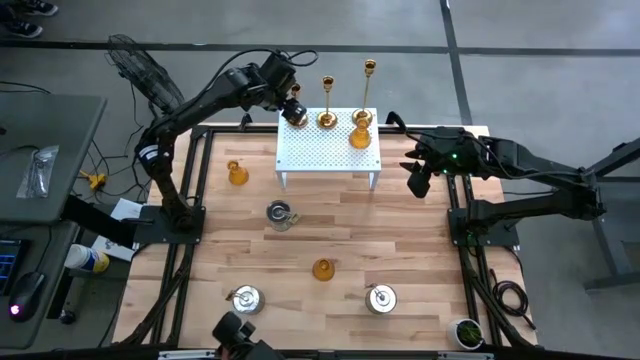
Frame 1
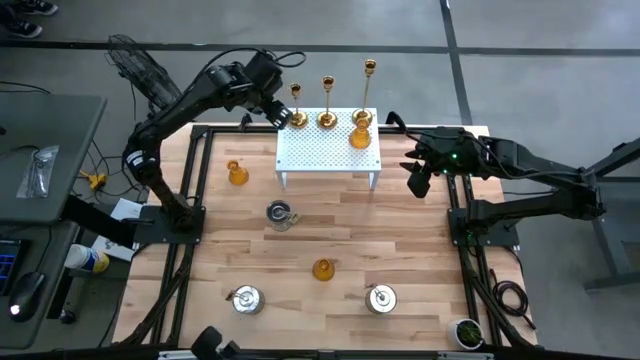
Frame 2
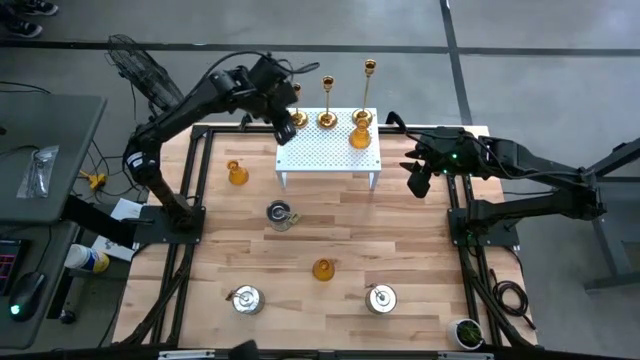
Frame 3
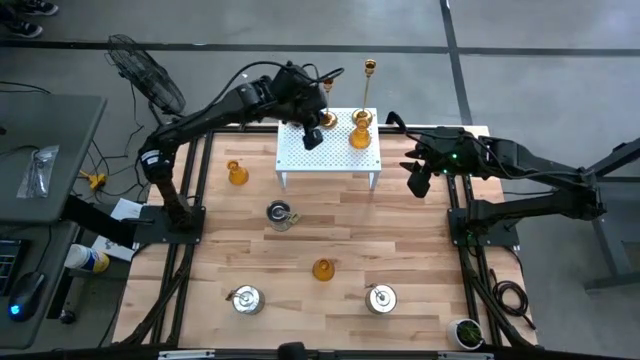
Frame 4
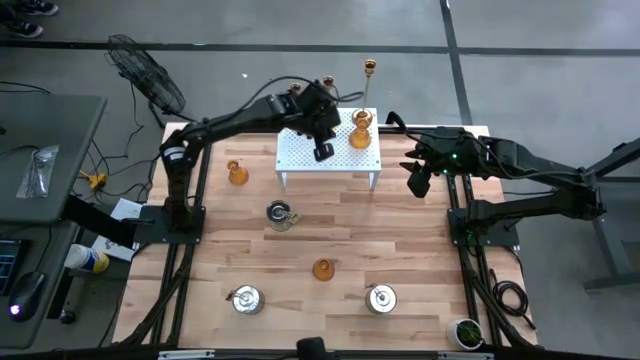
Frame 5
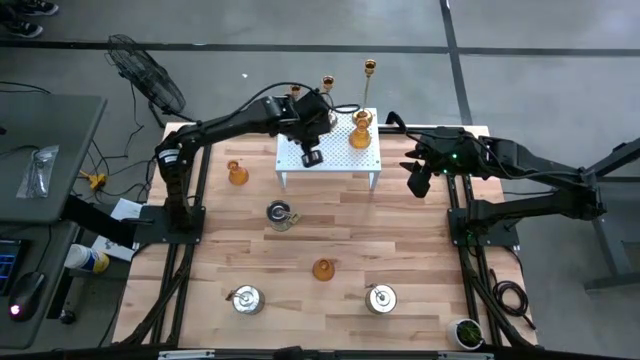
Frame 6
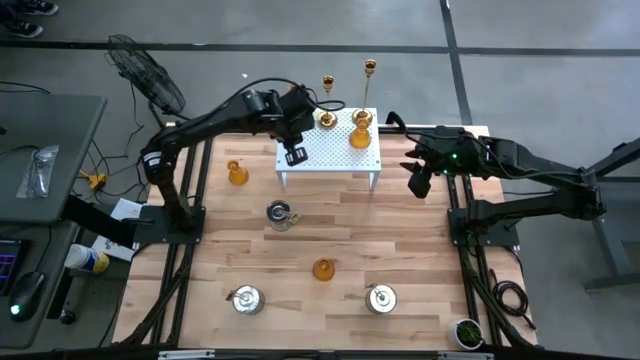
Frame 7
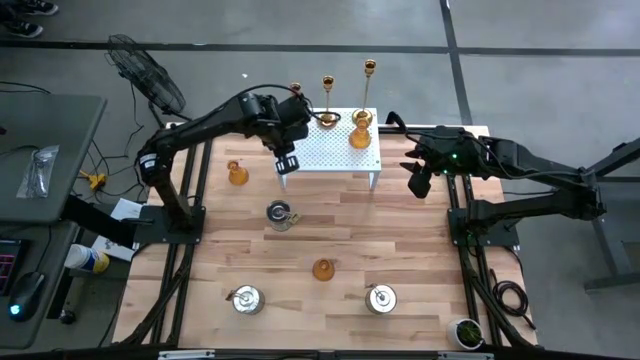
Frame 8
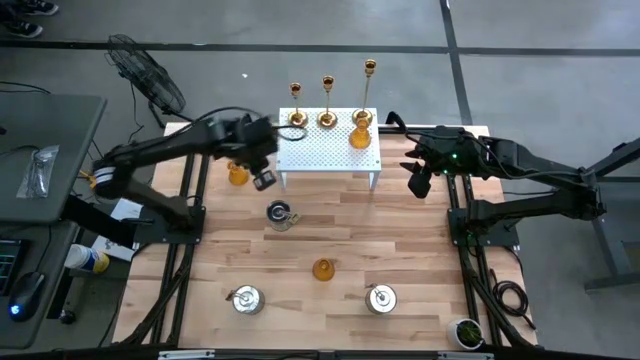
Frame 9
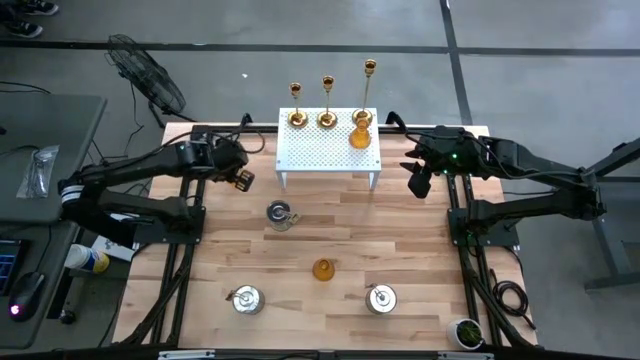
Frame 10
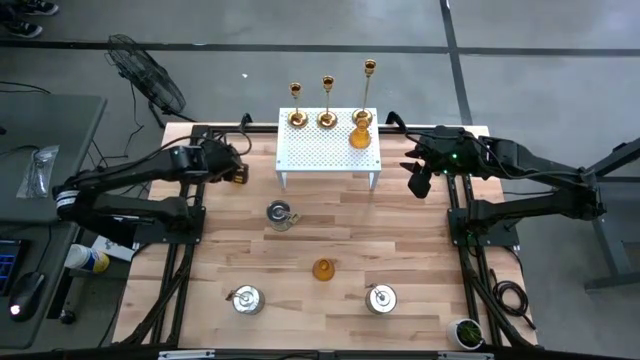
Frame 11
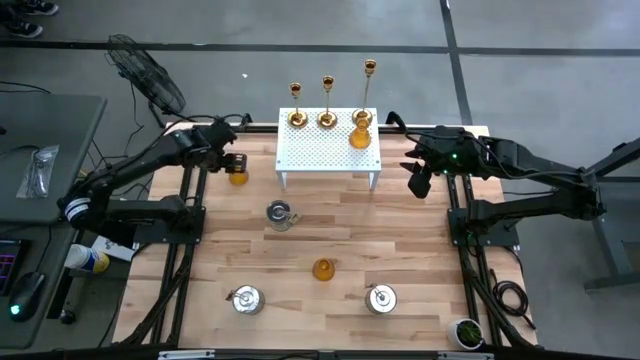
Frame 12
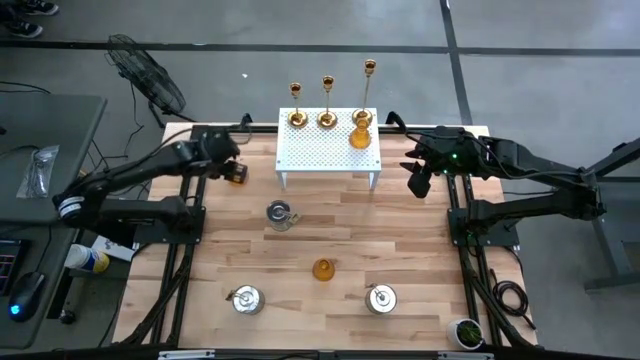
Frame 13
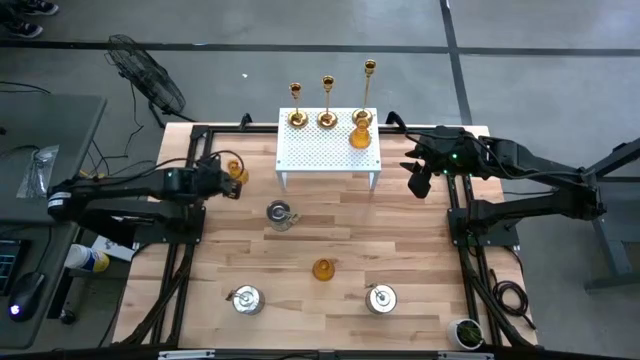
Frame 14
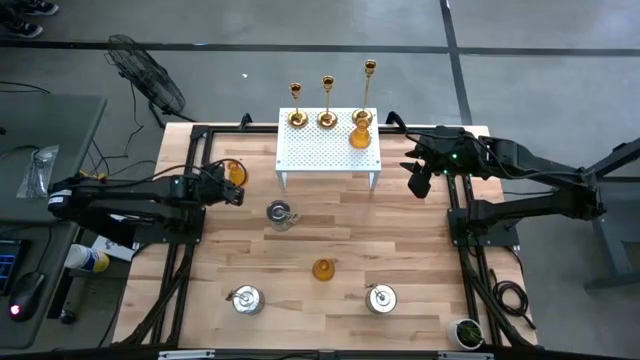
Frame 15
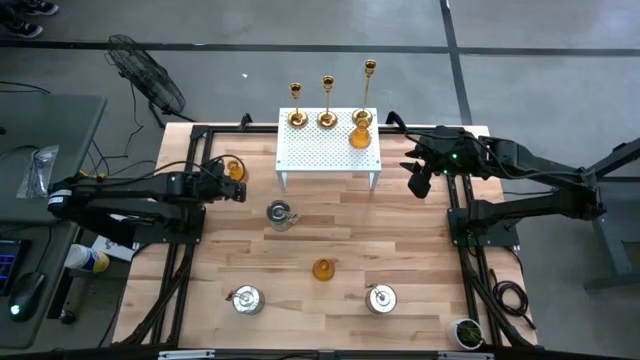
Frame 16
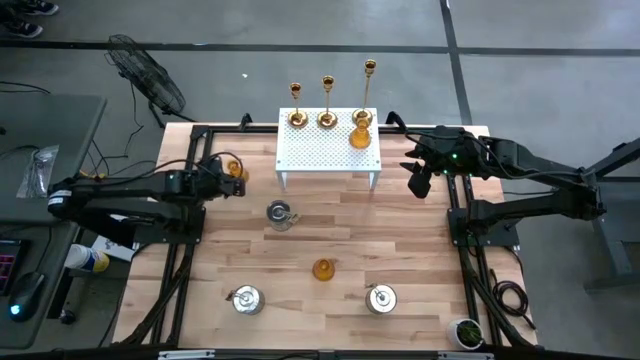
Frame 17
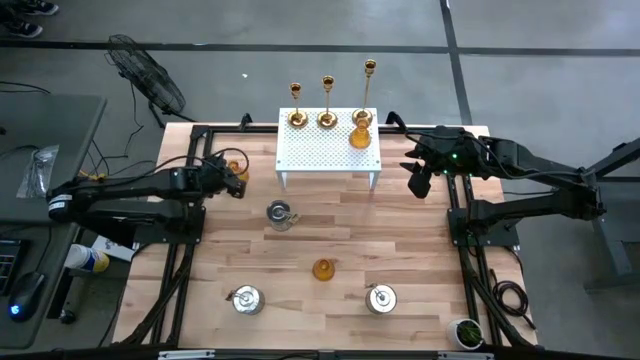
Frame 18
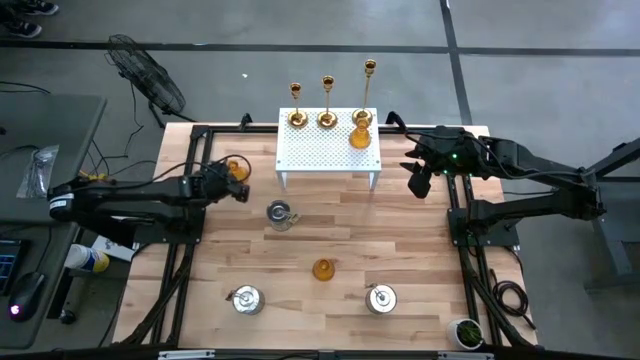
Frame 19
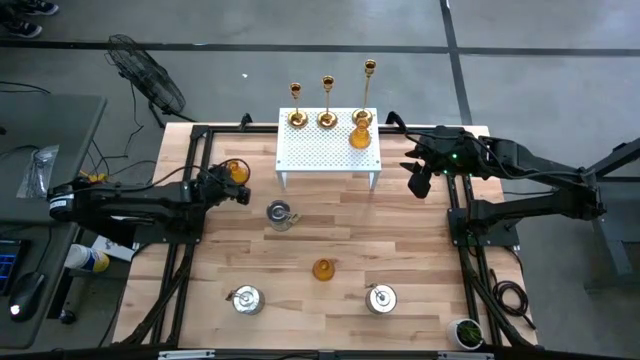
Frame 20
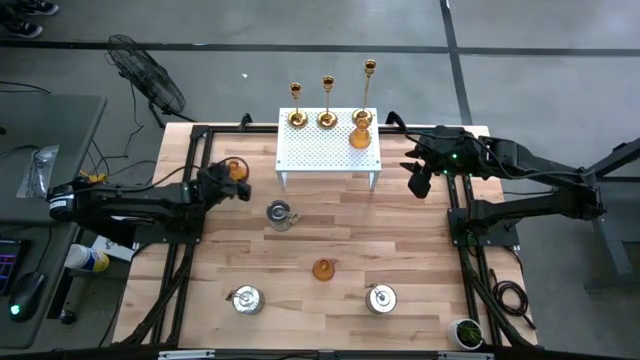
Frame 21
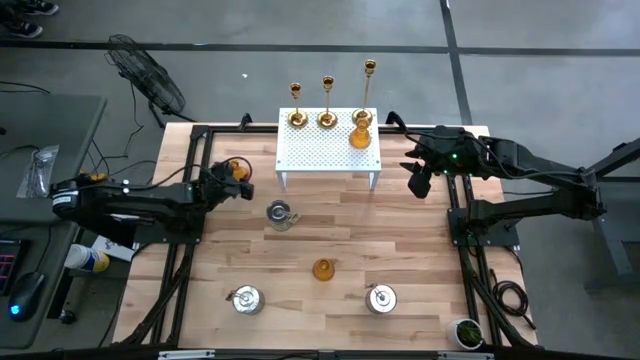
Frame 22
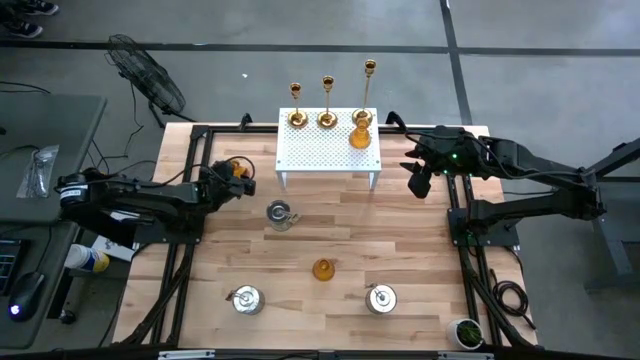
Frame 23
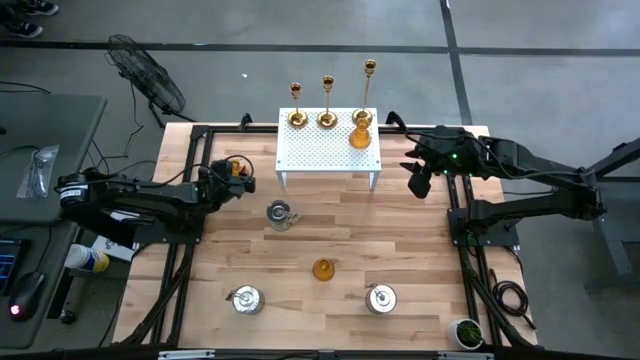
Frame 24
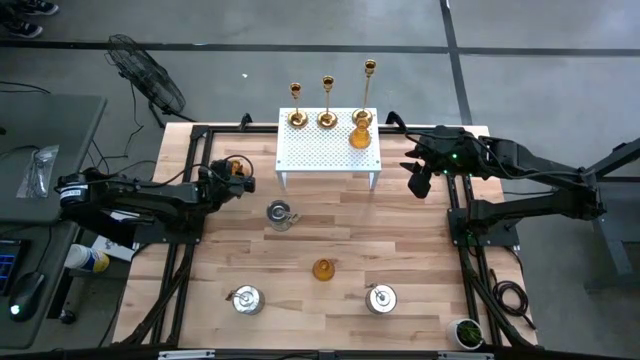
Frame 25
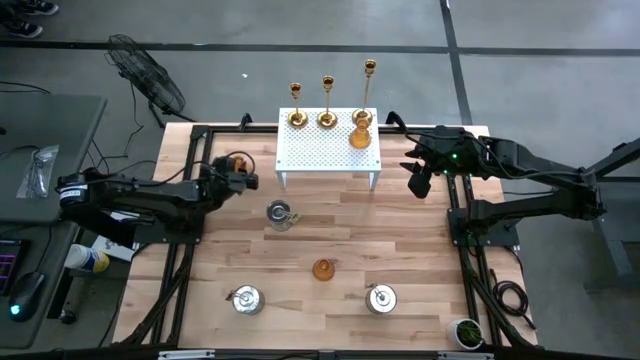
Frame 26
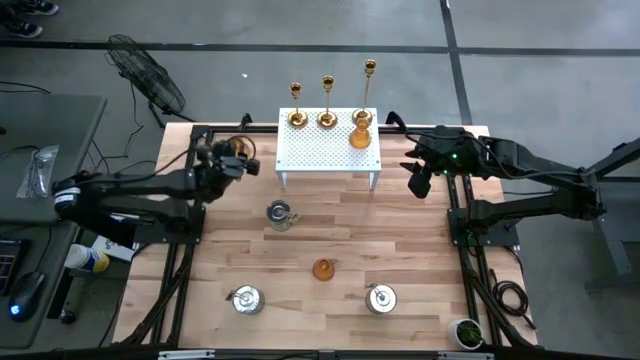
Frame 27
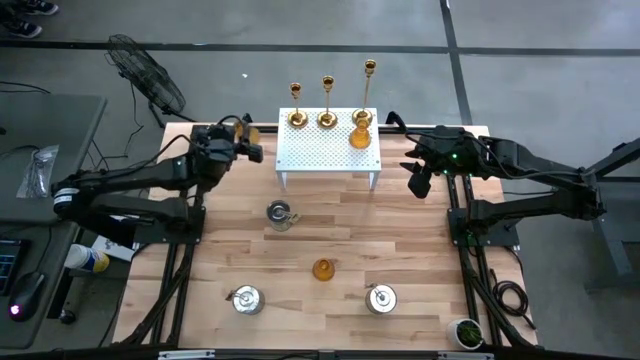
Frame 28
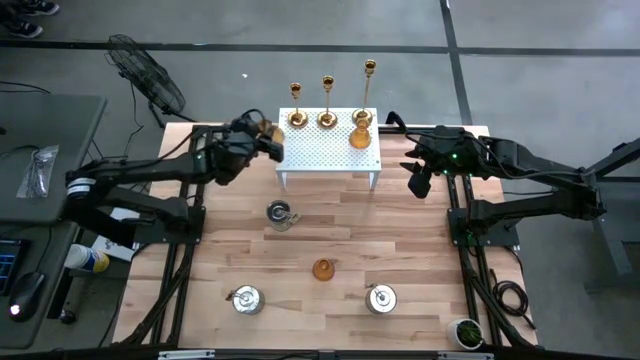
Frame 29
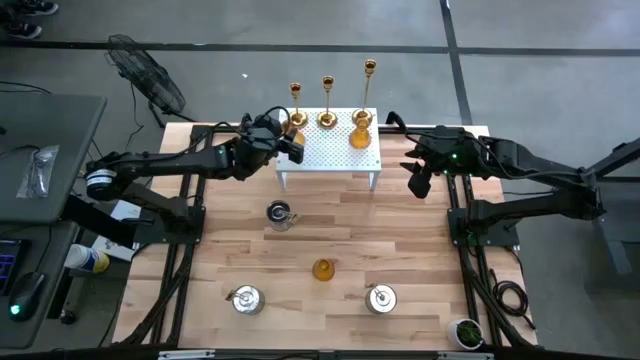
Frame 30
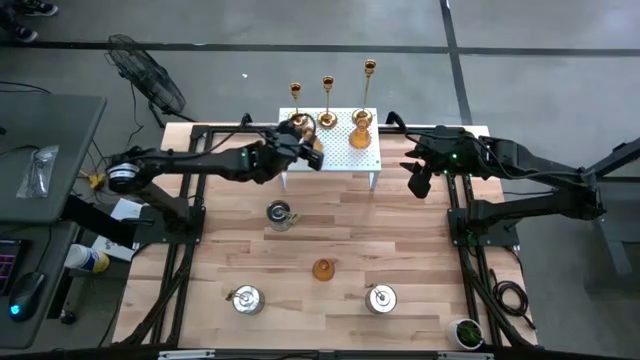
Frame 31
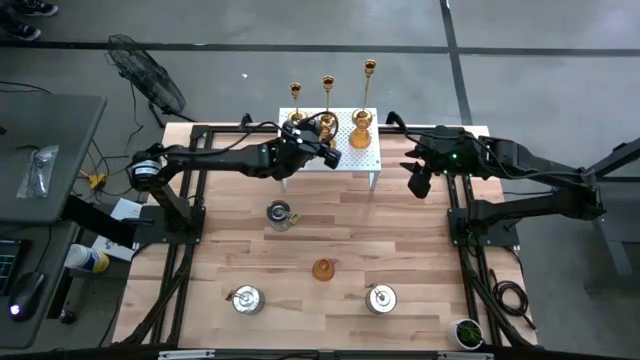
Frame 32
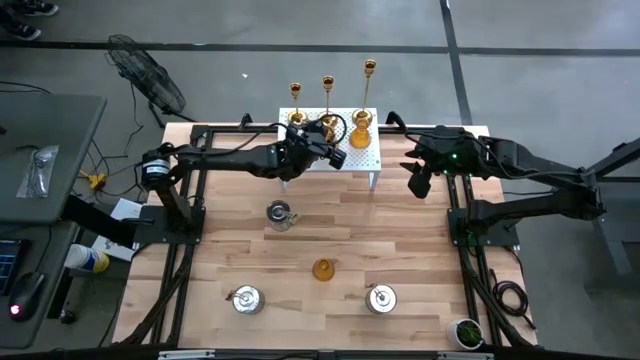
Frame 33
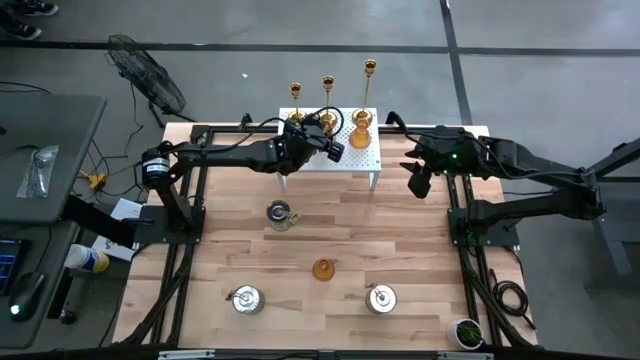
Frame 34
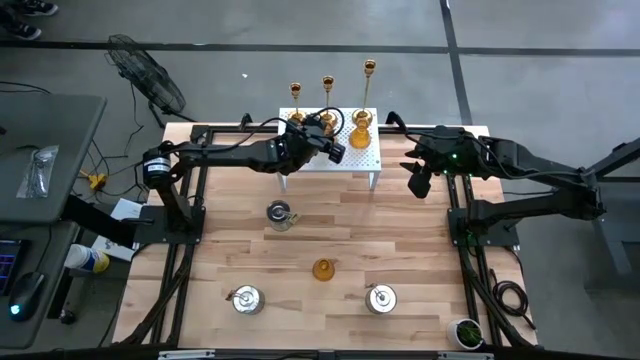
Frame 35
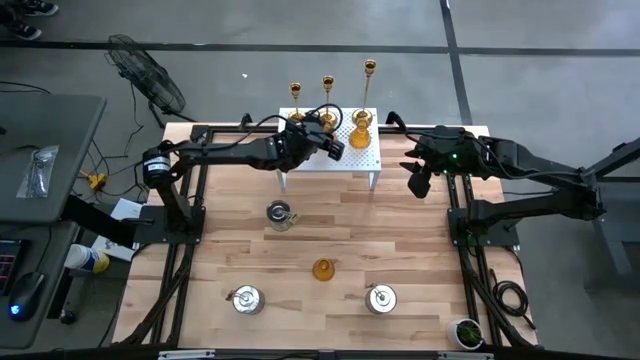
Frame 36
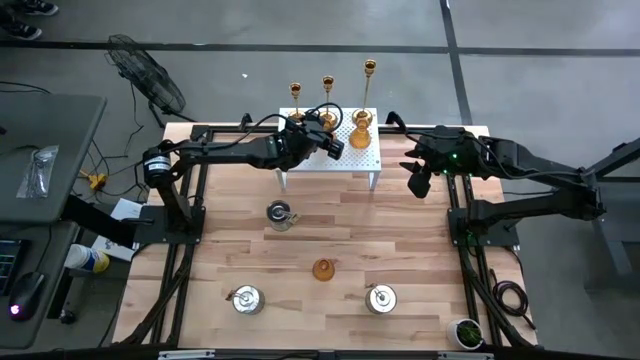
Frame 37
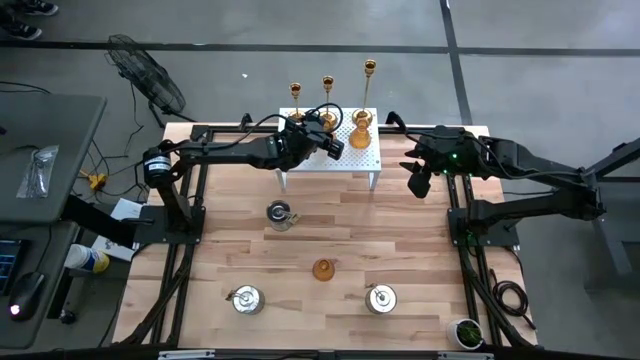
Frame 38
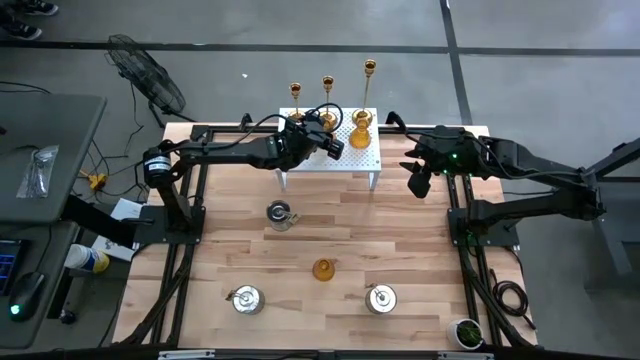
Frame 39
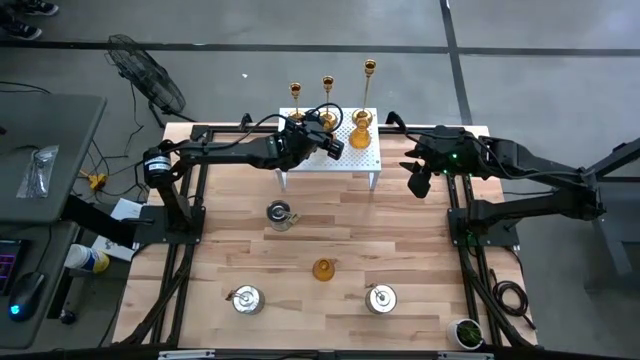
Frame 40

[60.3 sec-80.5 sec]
Task: Pick & Place candle stick holders
Put the top brown glass candle holder on the shelf aligned with the other brown glass candle holder

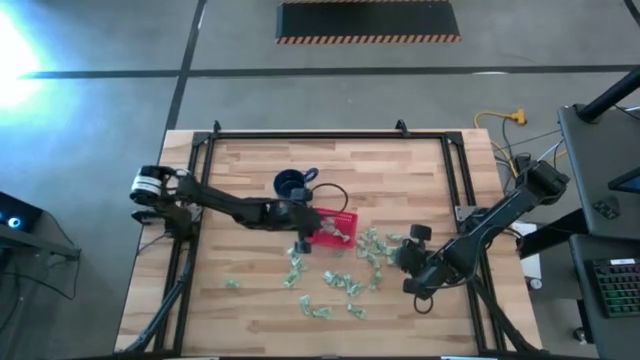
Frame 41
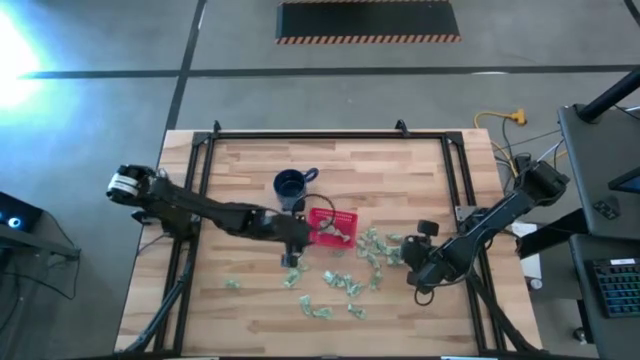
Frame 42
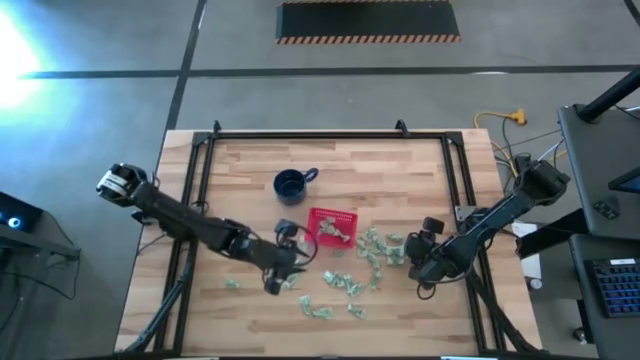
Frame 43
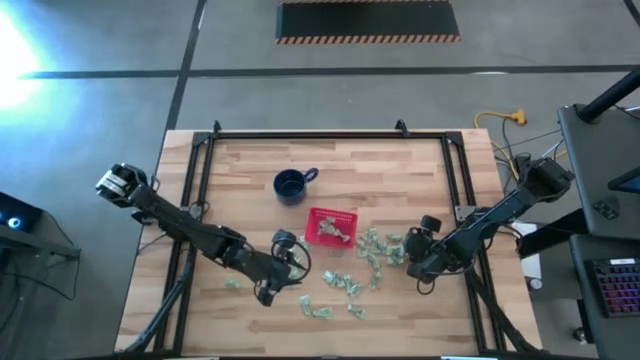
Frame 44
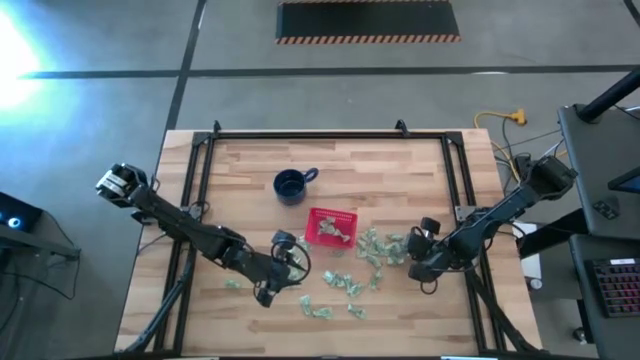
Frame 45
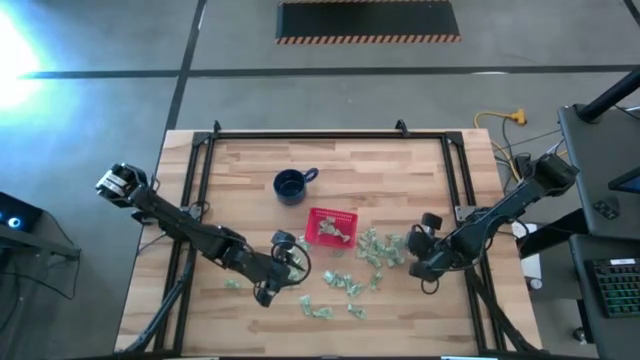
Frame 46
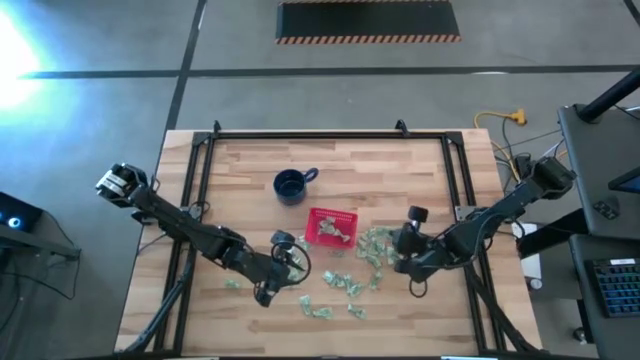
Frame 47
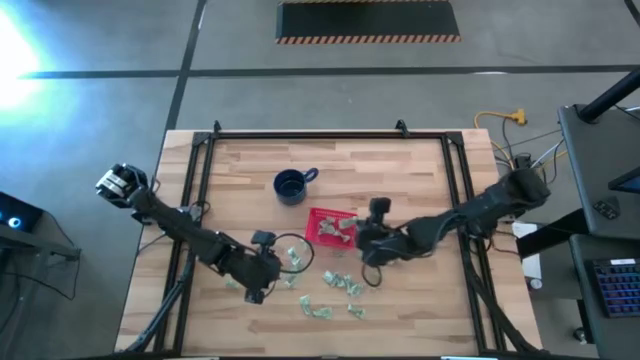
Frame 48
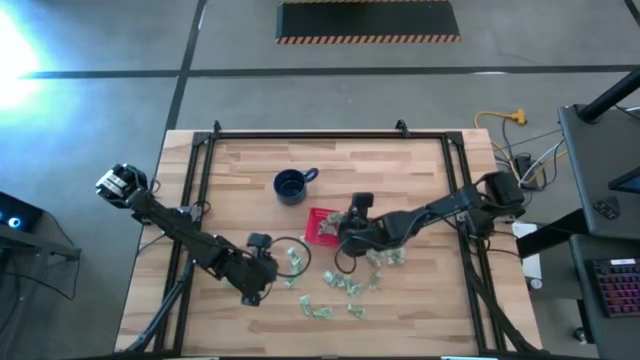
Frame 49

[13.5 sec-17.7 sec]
Task: Pick and place Stevia / Truvia into bins
Put the white stevia packet into the red basket
